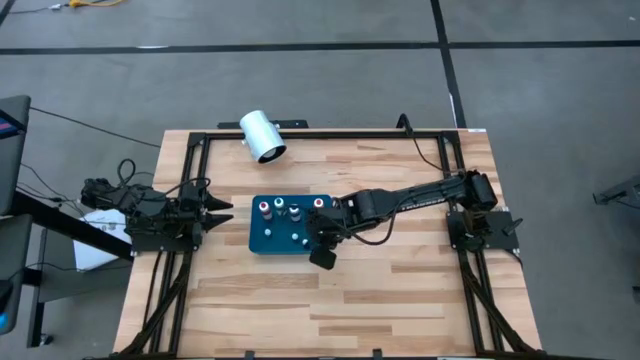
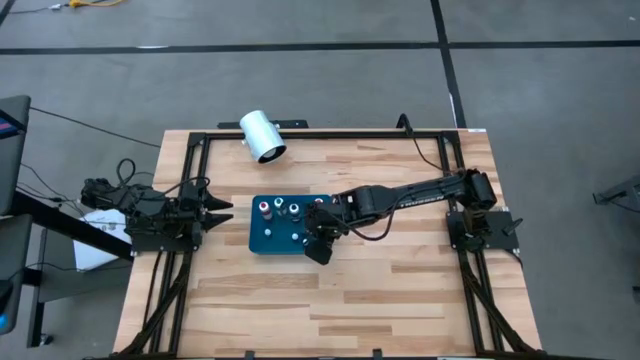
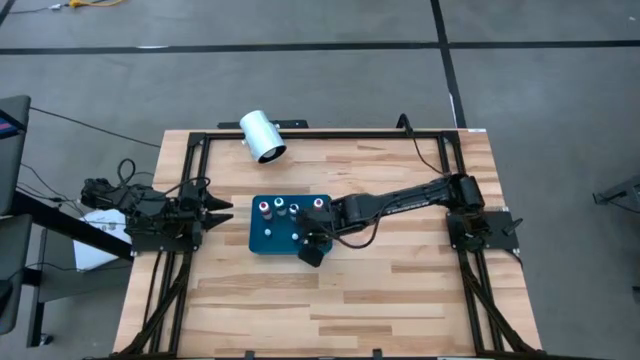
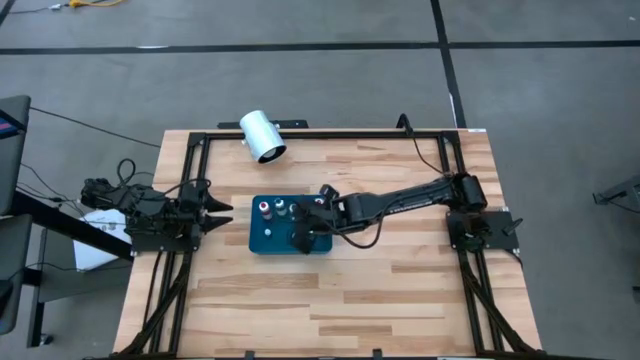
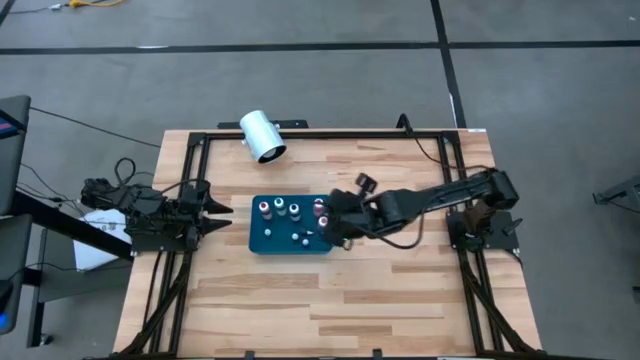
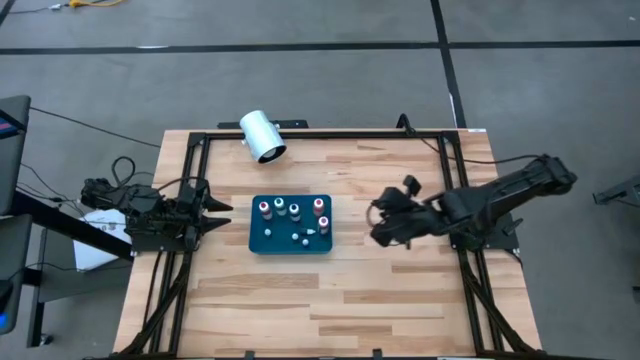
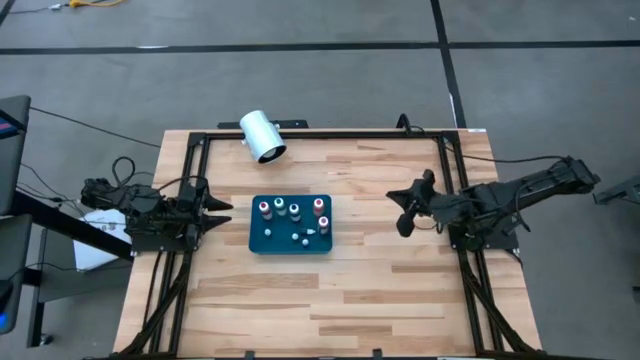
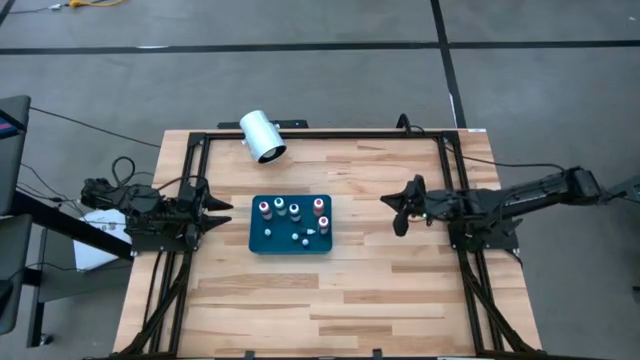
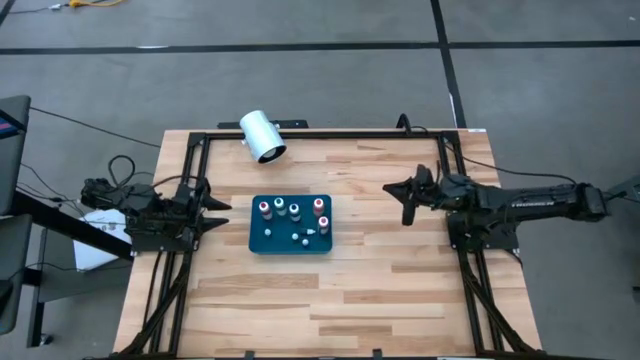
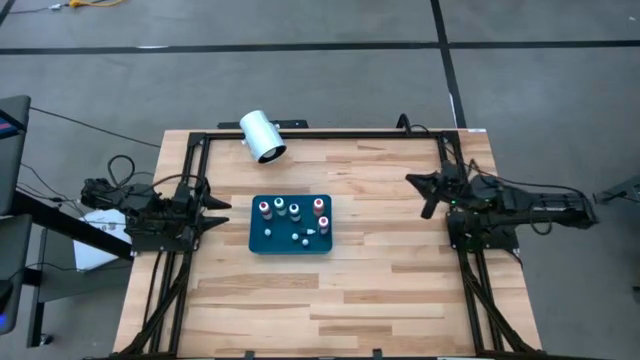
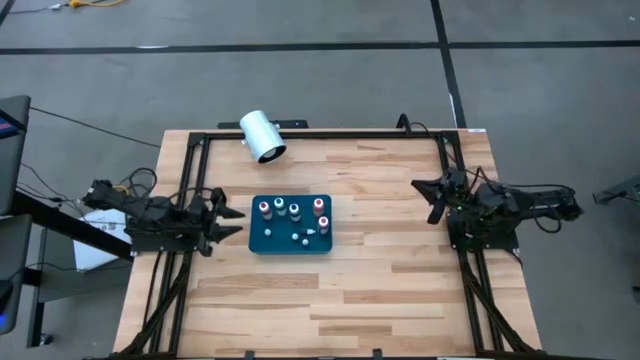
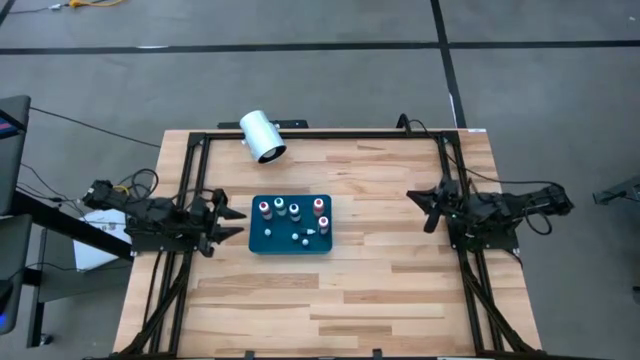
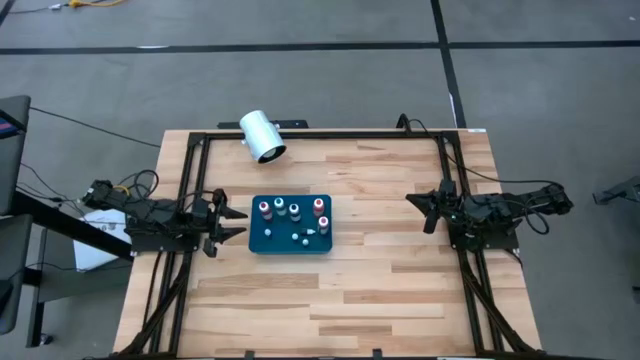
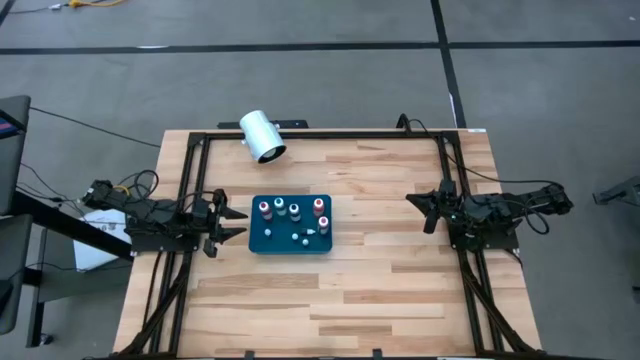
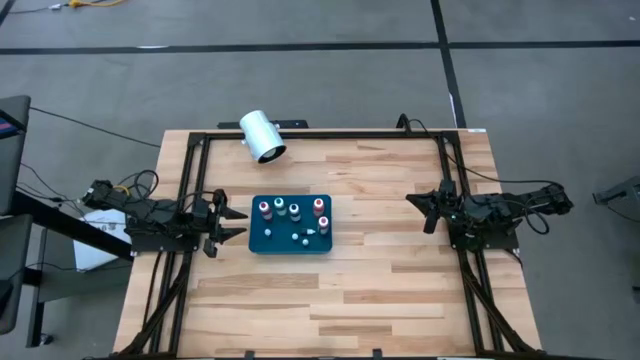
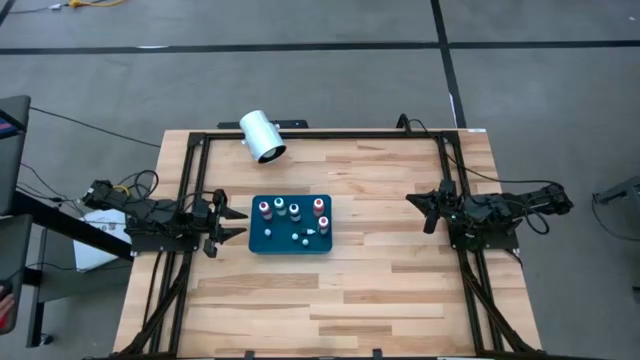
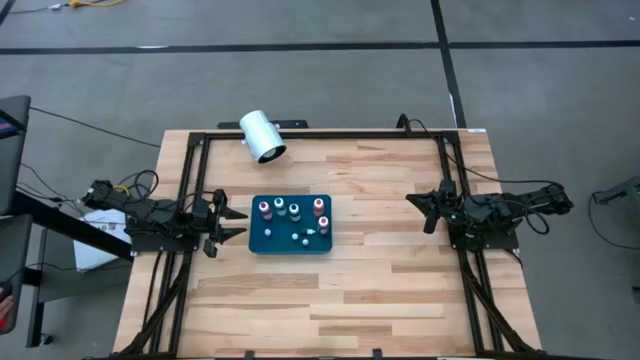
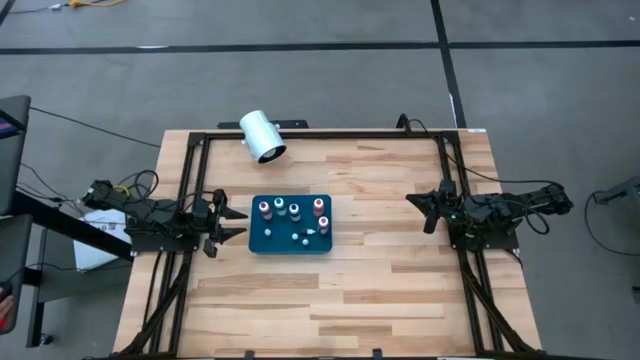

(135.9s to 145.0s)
Task: Pick & Place food coloring
Return to Home Position

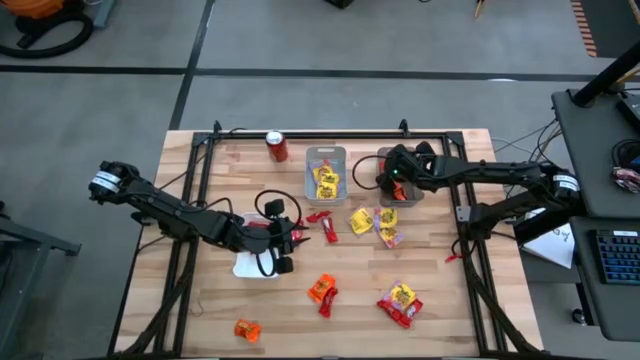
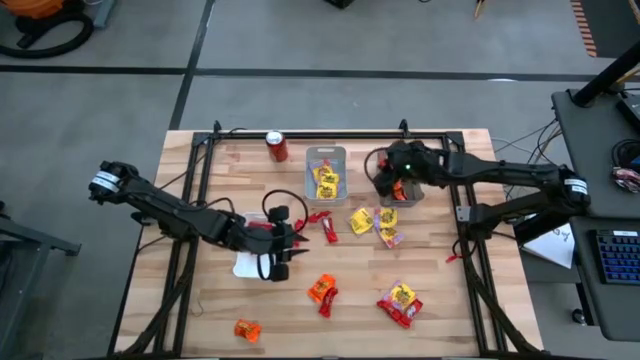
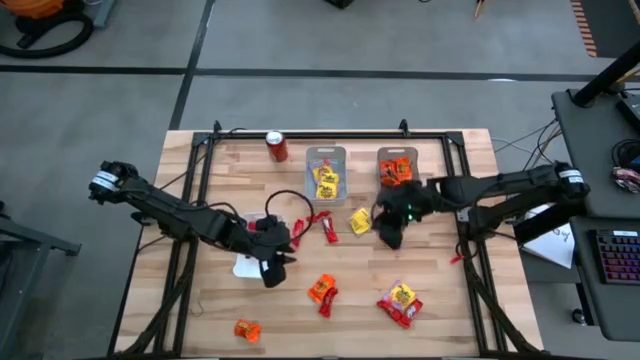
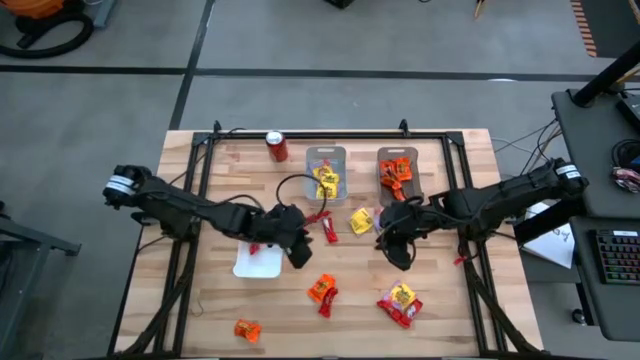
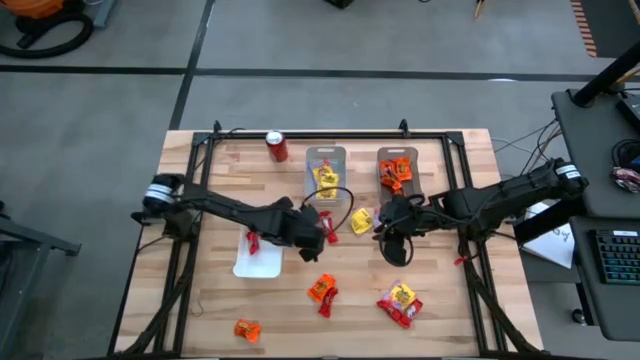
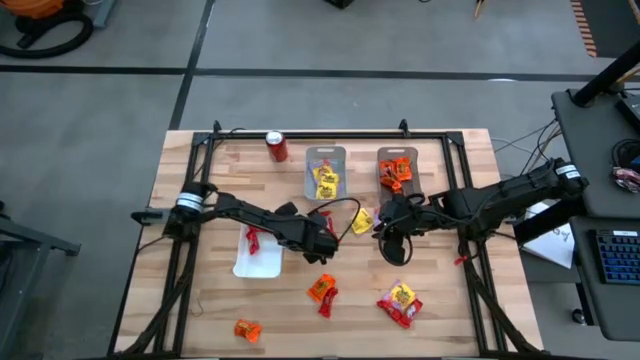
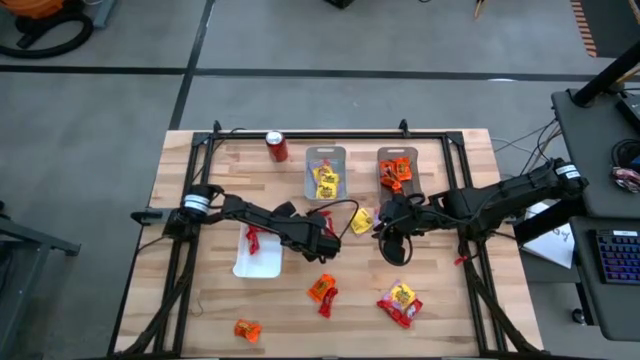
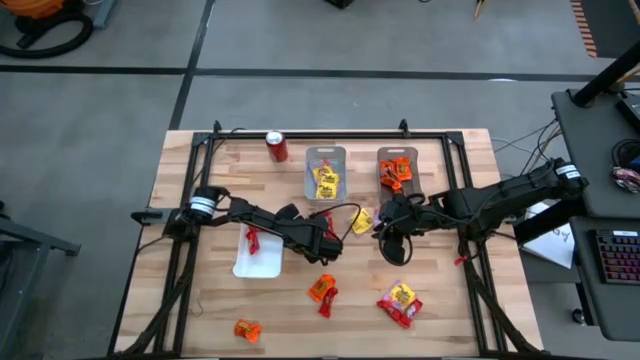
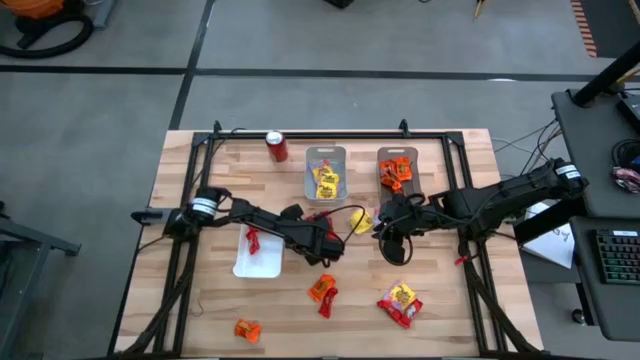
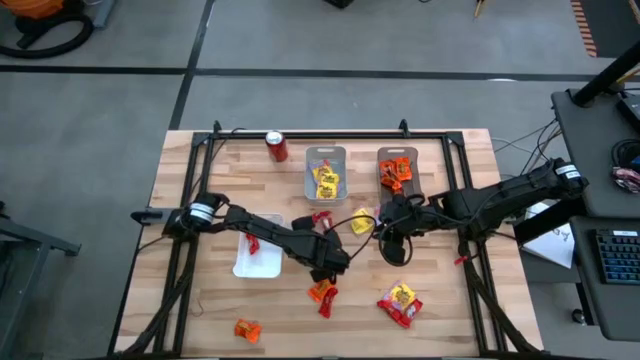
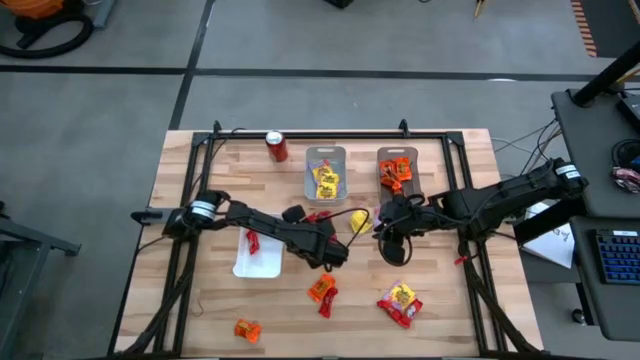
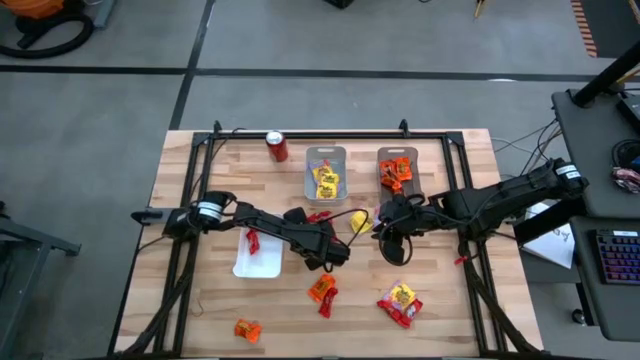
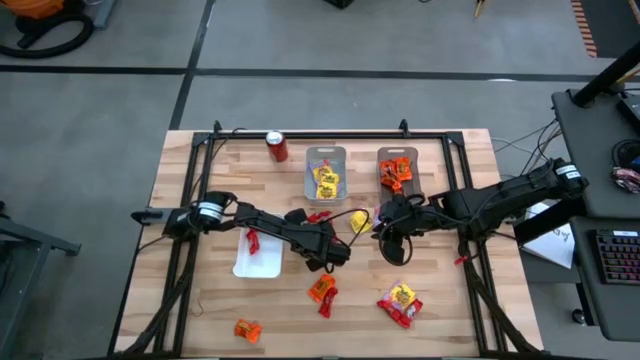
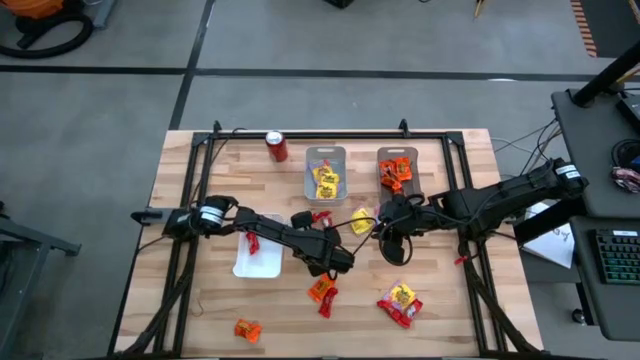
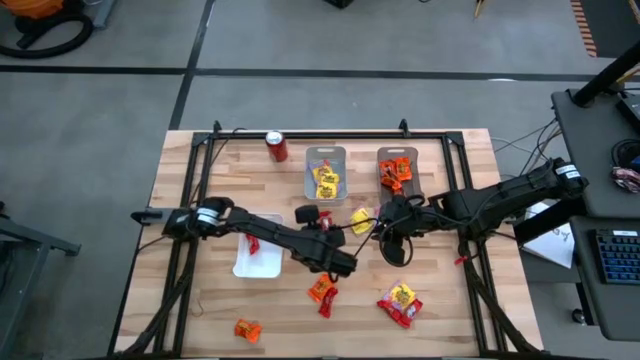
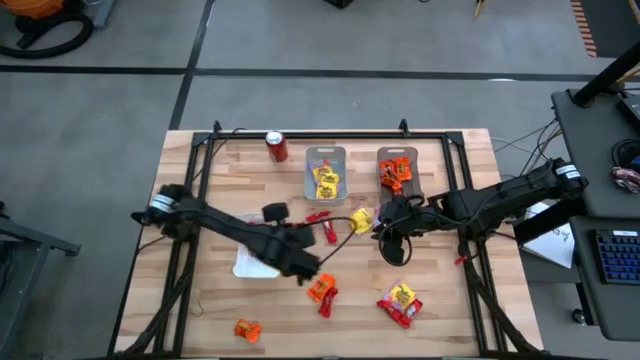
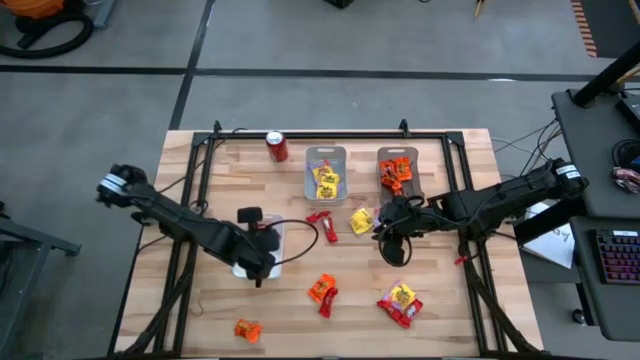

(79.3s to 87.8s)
Task: Sort candy
Put the red candy into the white bin
